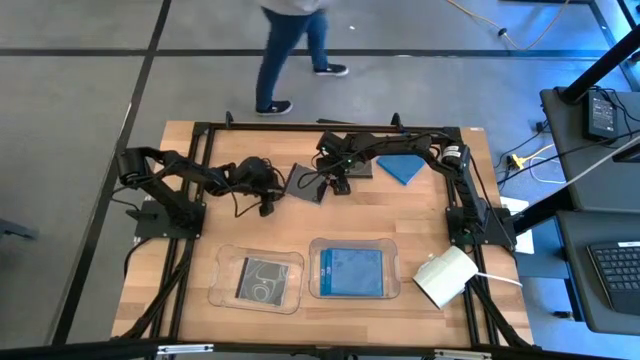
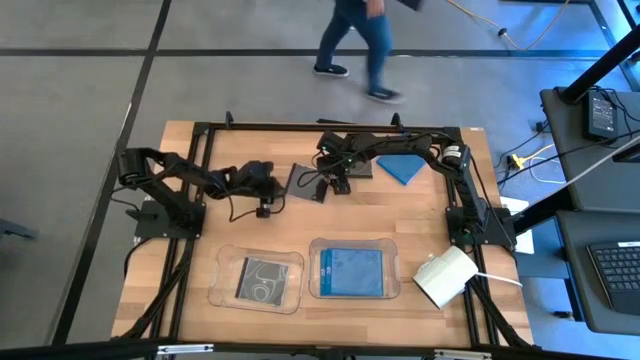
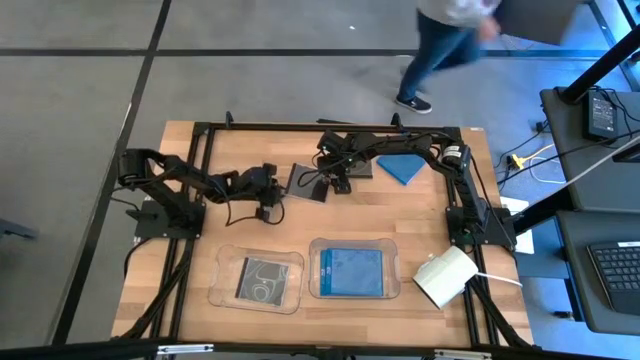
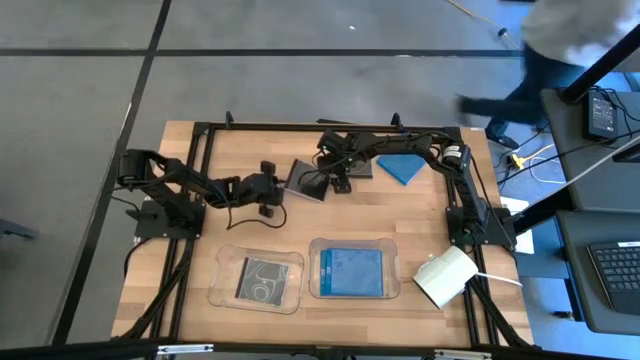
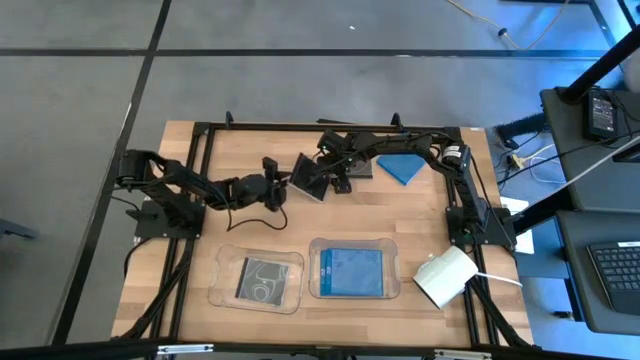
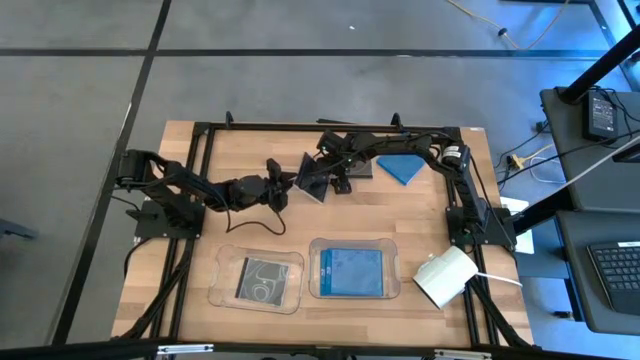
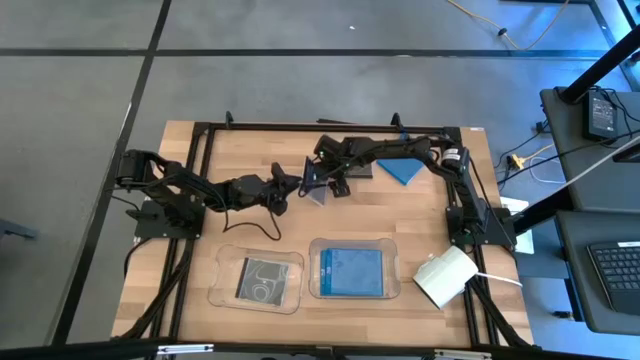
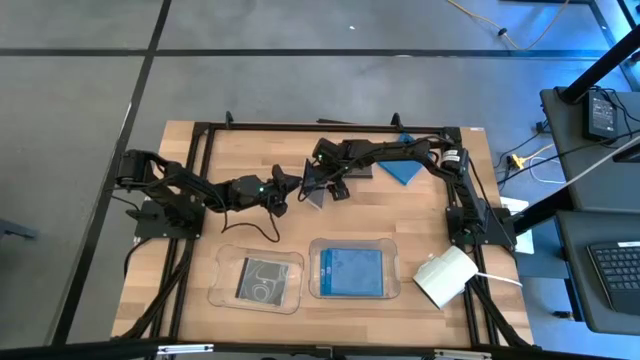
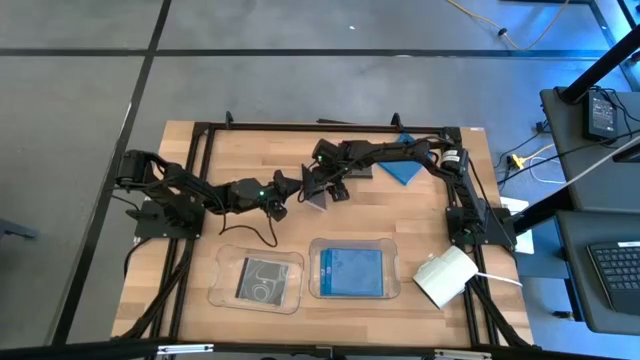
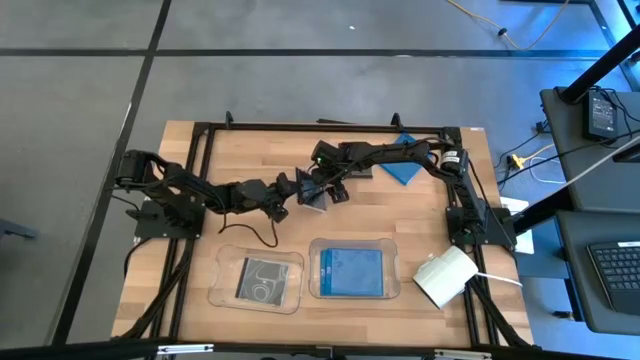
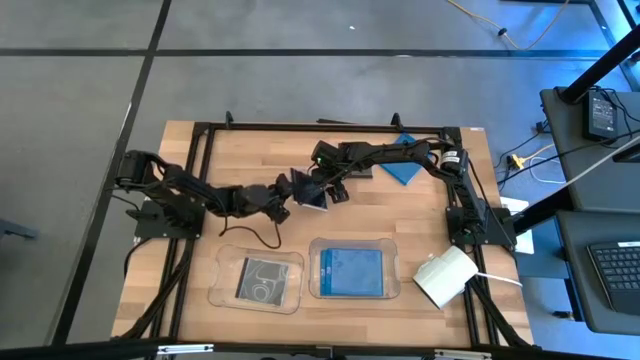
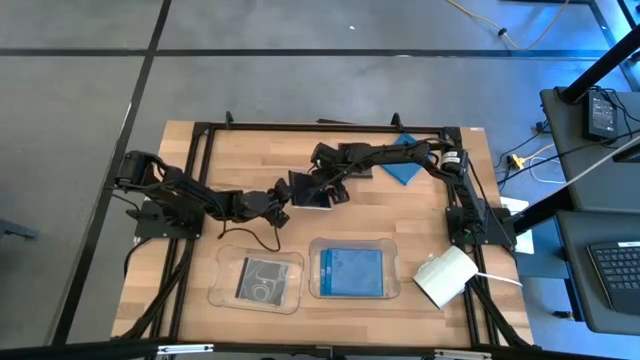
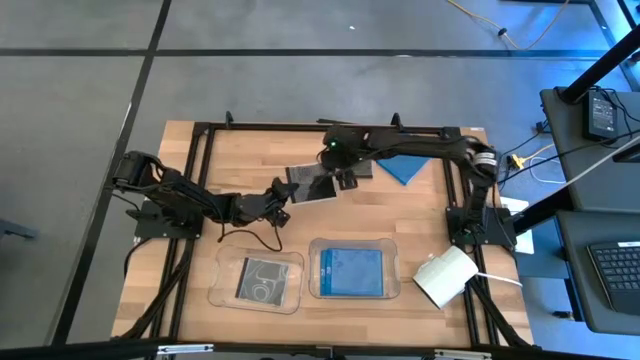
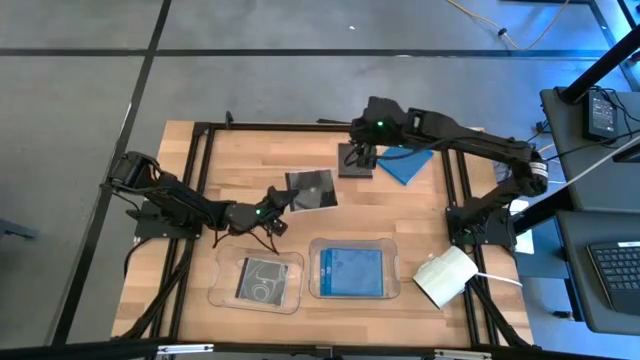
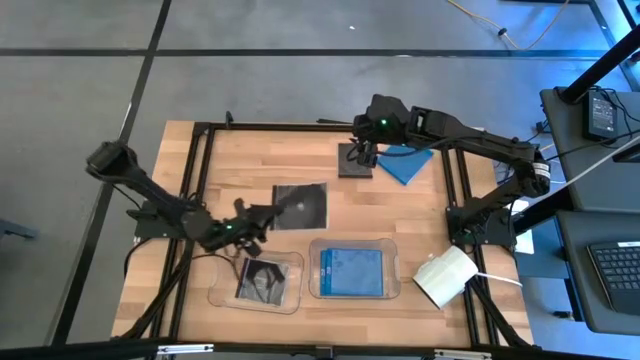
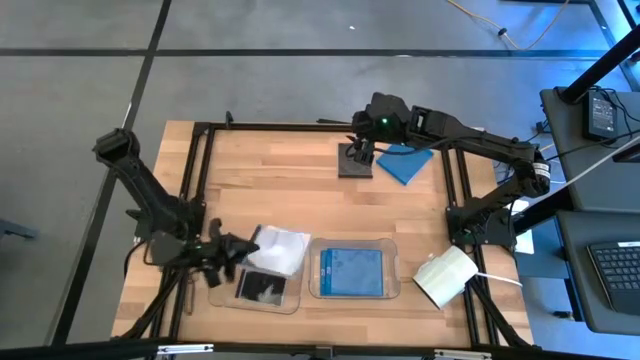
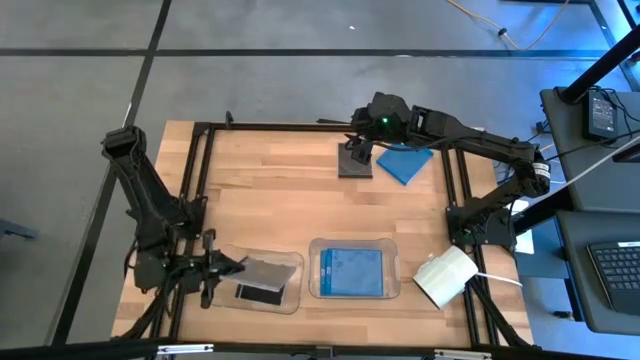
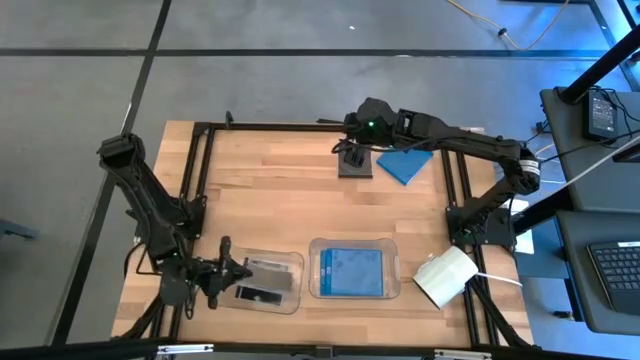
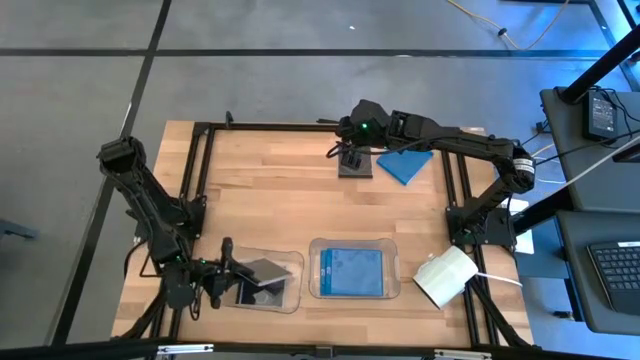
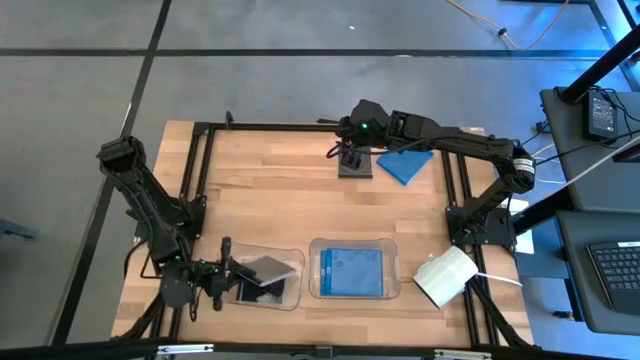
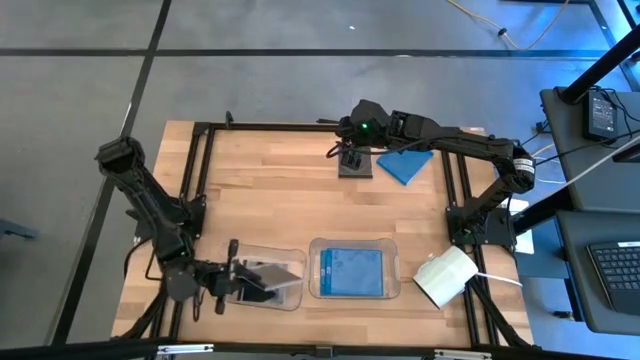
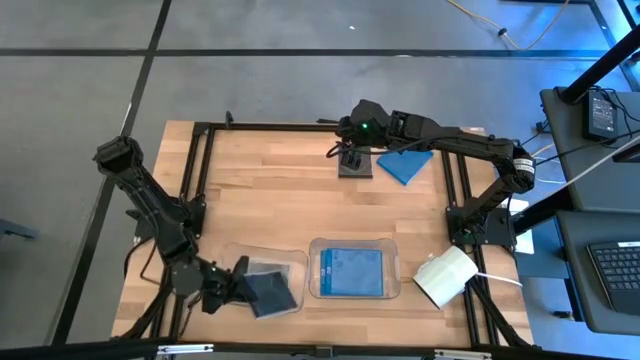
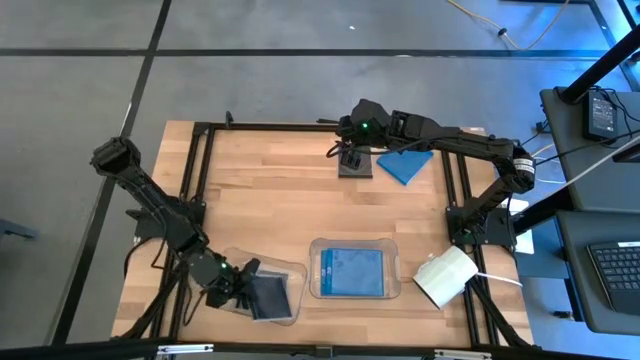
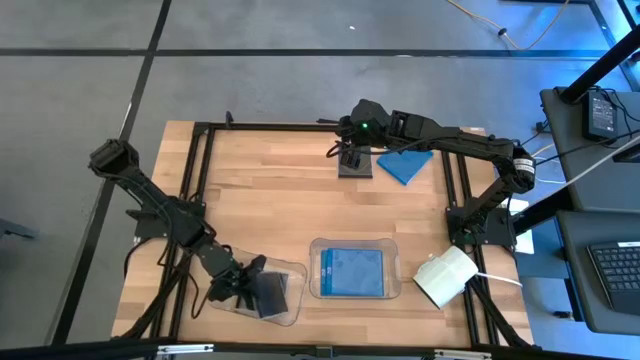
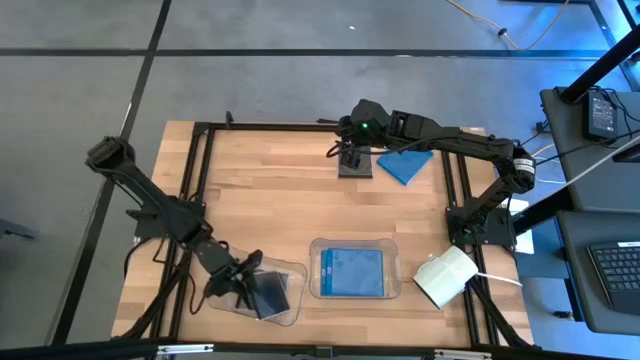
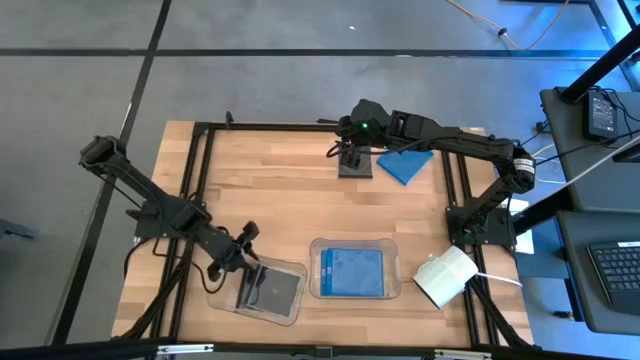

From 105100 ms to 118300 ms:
Task: Pick & place jewel cases by type
Put the bottom black CD case into the left transparent bin
